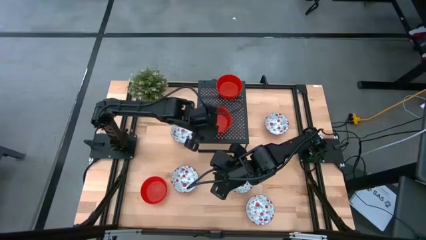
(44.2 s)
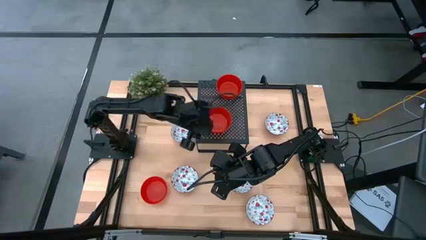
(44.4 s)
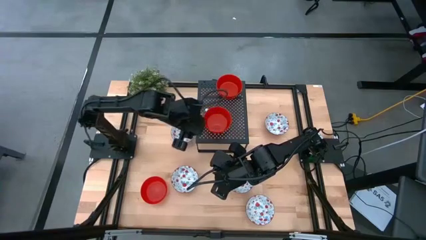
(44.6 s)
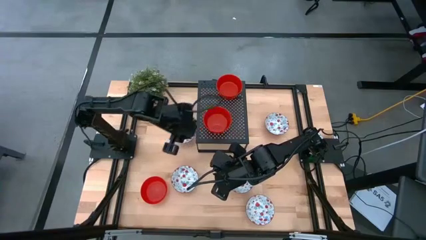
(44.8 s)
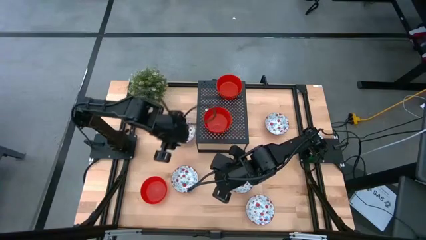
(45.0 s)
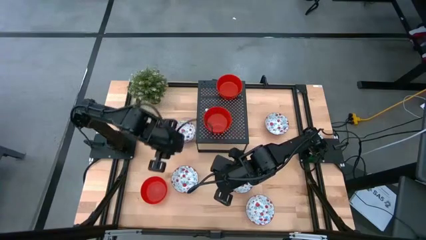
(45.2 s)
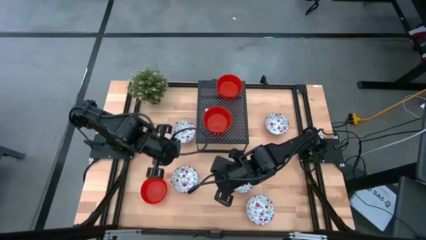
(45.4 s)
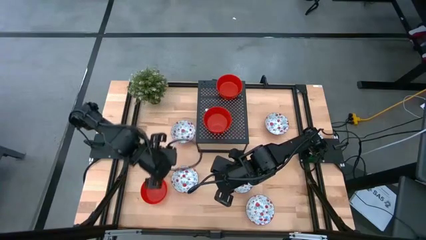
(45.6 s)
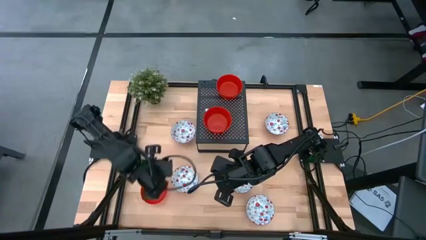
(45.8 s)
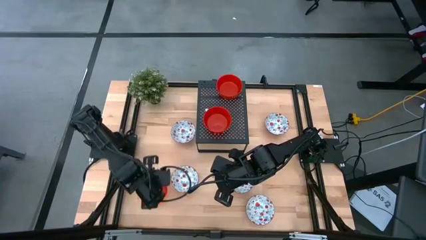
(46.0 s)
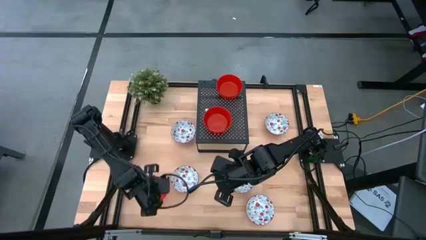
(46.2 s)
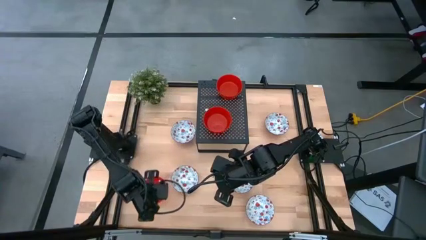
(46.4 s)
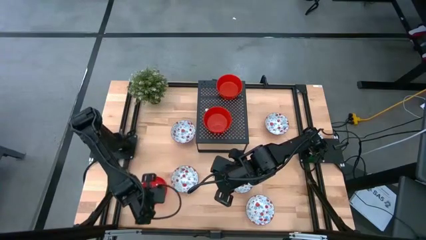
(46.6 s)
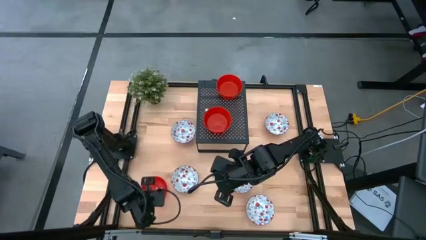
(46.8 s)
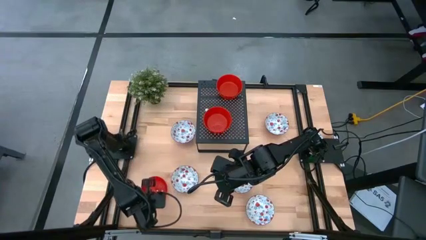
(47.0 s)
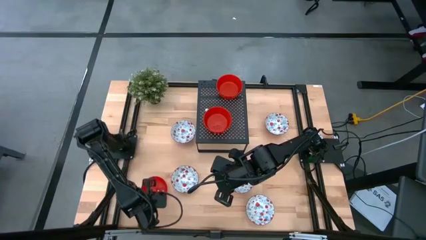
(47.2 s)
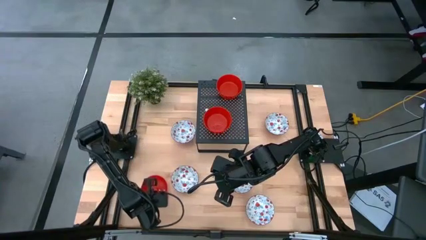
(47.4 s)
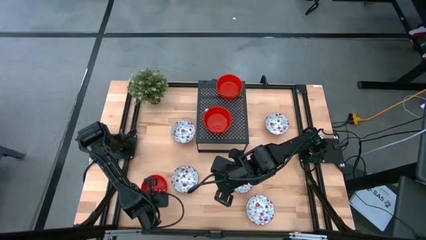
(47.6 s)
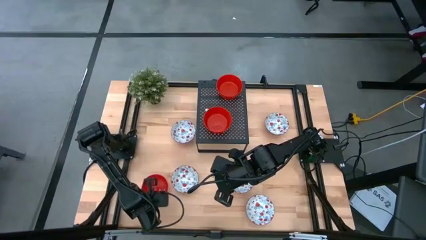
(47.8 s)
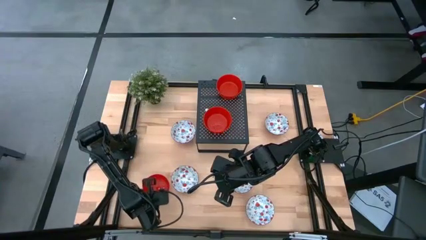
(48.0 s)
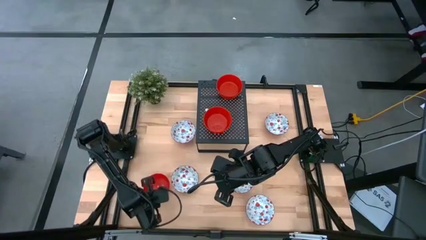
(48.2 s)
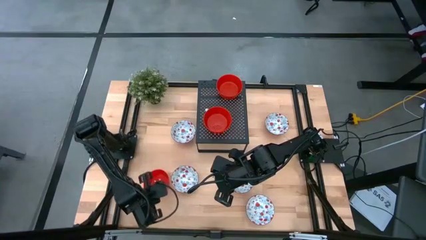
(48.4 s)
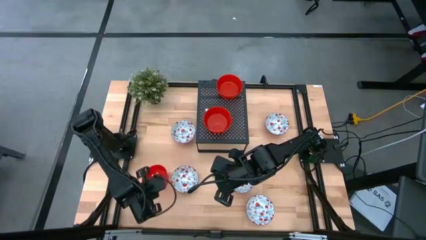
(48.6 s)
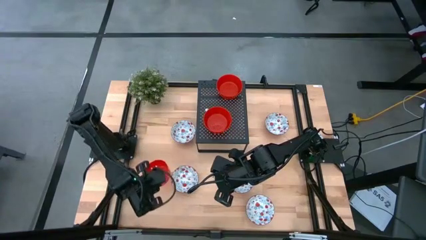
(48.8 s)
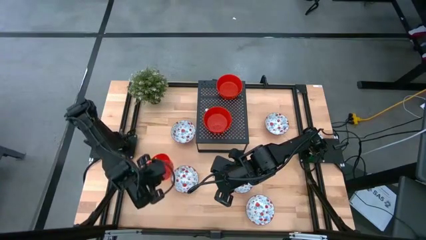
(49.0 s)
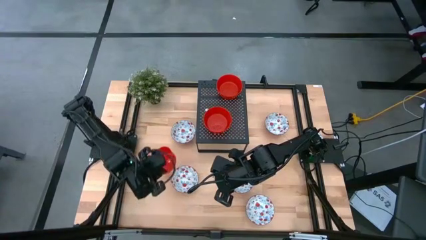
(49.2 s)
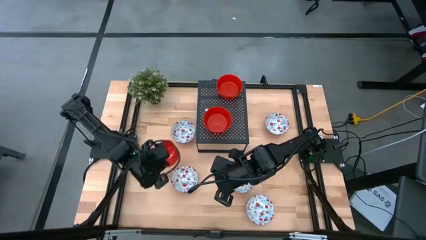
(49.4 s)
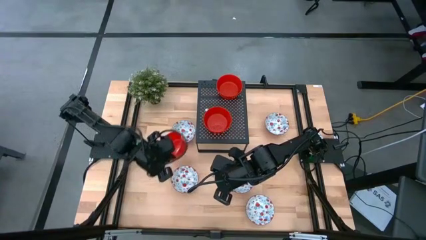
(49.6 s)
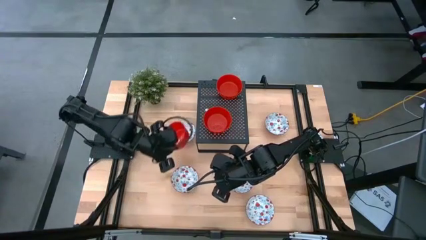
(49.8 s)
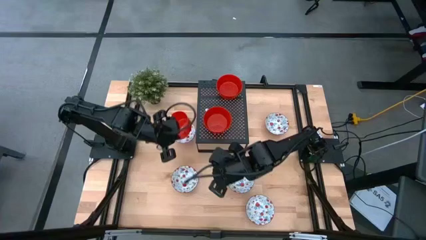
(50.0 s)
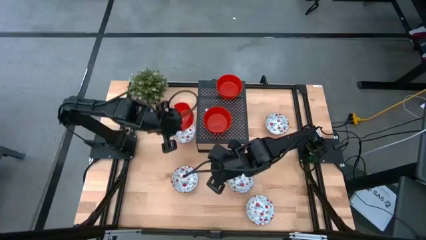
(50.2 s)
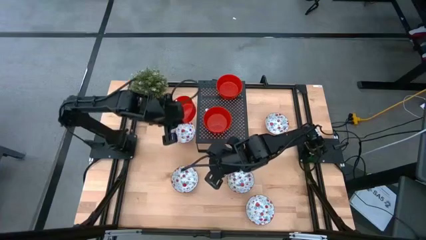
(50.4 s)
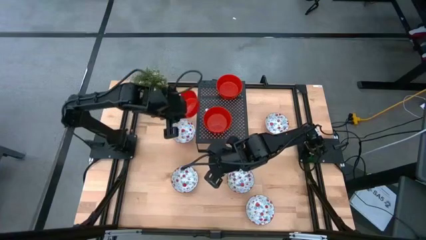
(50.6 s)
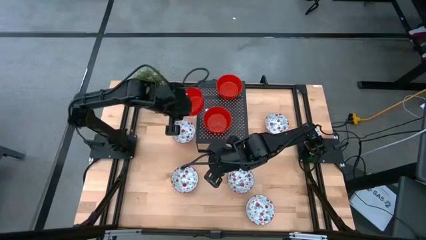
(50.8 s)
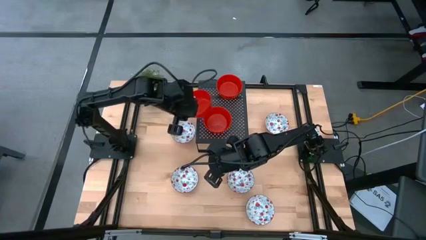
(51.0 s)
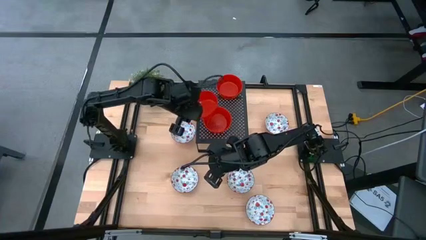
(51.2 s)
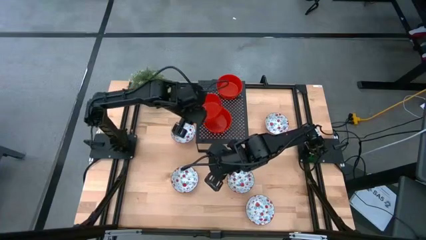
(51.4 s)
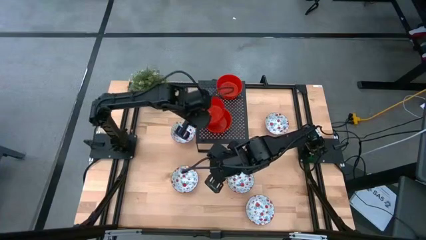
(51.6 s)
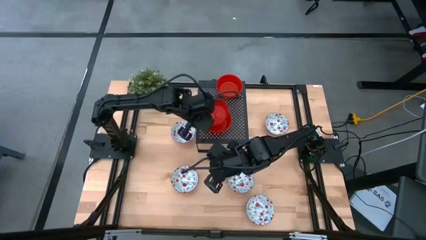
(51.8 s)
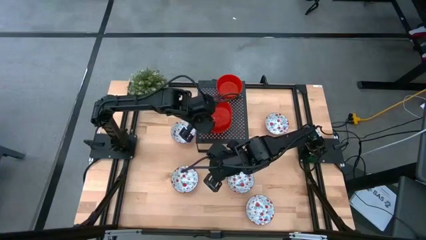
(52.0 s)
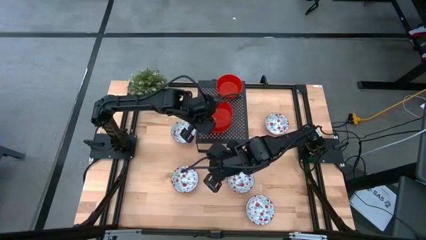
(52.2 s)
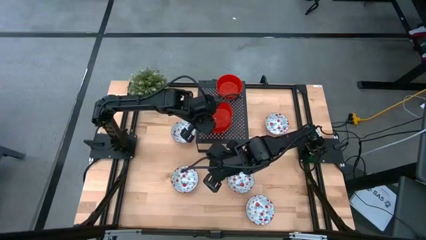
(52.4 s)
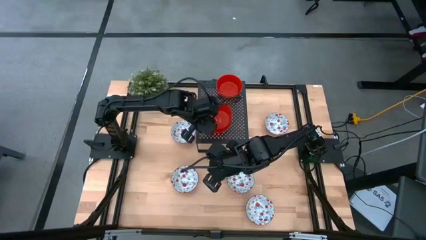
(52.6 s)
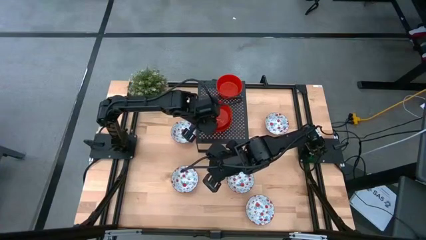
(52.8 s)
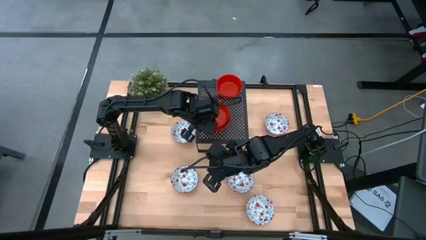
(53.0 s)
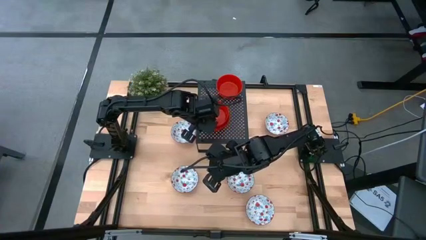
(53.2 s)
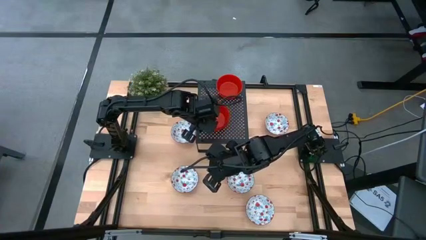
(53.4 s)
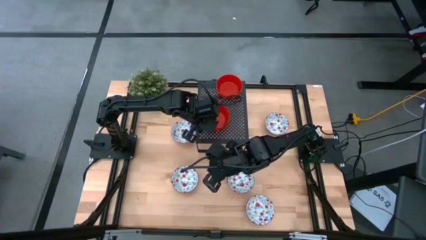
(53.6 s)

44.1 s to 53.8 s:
Task: Pick & Place Mini bowls
Stack the red bowl on top of the bottom red bowls on the shelf

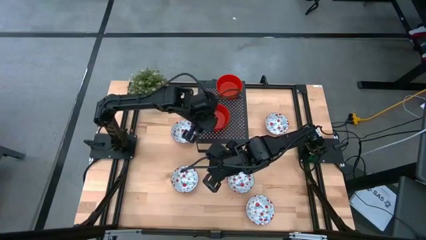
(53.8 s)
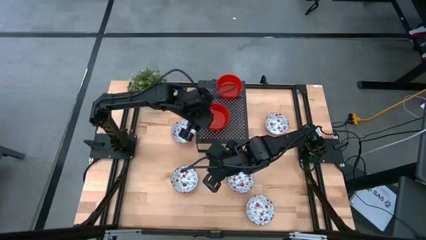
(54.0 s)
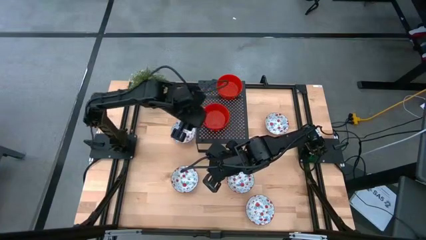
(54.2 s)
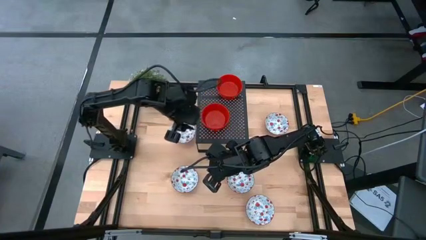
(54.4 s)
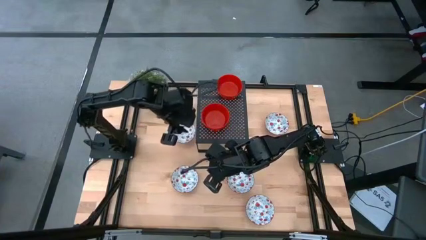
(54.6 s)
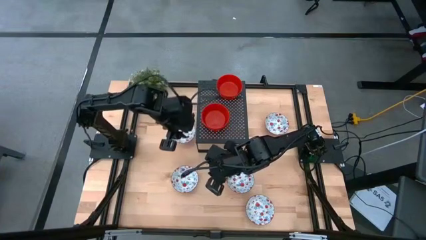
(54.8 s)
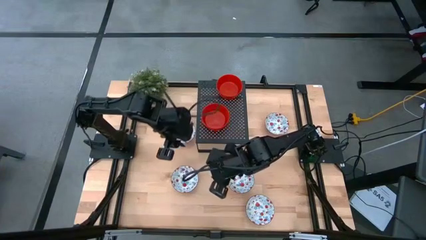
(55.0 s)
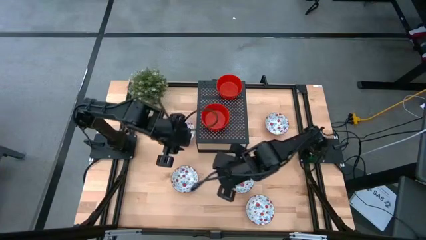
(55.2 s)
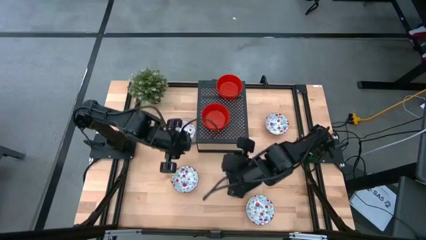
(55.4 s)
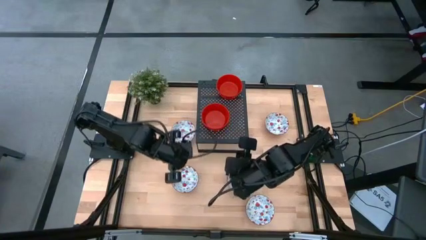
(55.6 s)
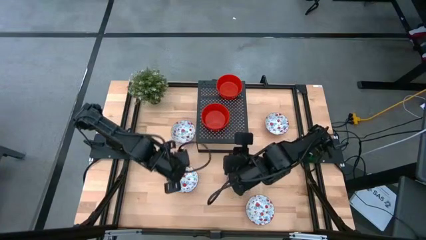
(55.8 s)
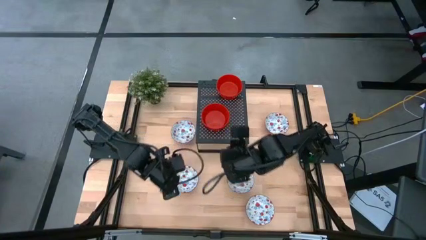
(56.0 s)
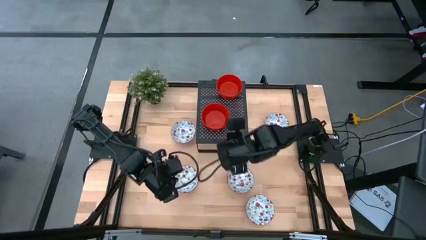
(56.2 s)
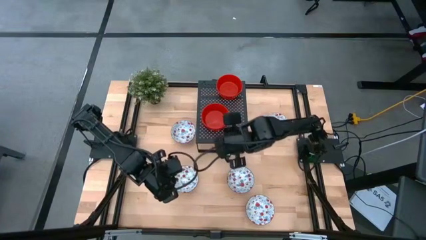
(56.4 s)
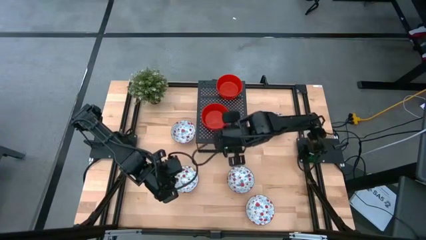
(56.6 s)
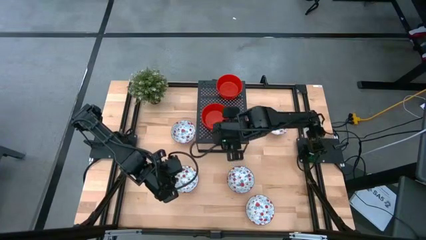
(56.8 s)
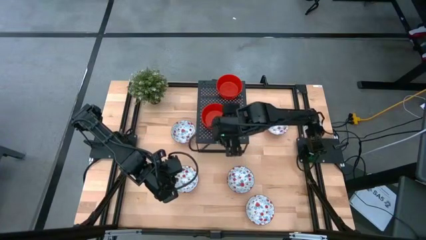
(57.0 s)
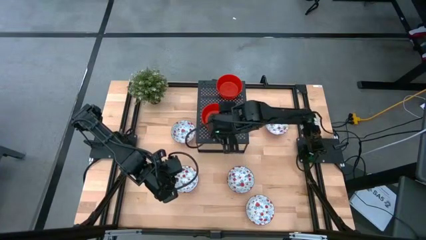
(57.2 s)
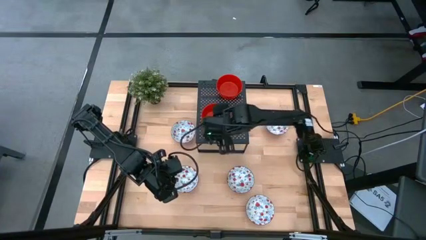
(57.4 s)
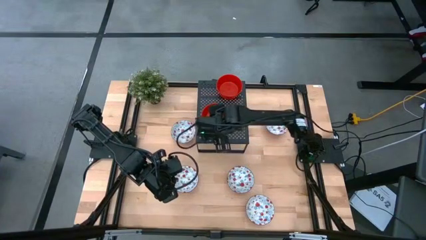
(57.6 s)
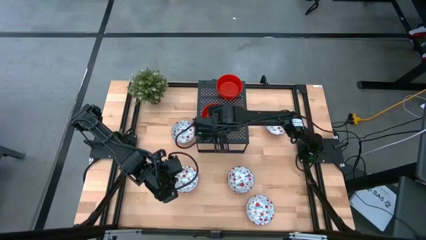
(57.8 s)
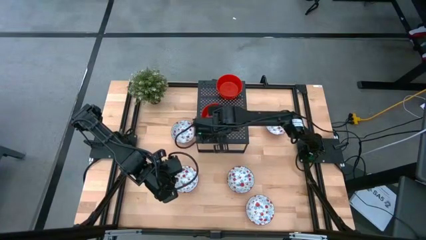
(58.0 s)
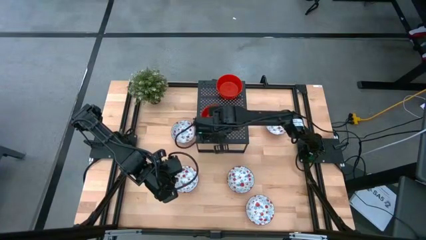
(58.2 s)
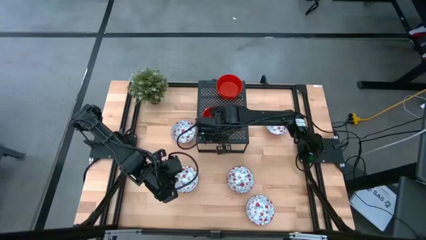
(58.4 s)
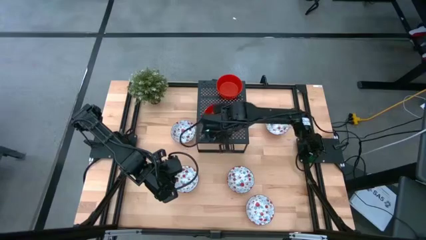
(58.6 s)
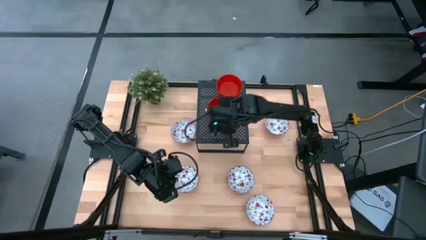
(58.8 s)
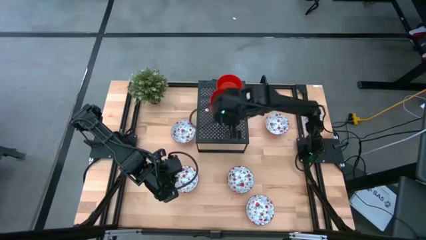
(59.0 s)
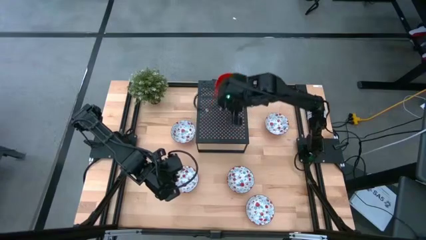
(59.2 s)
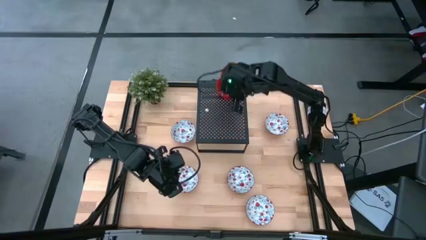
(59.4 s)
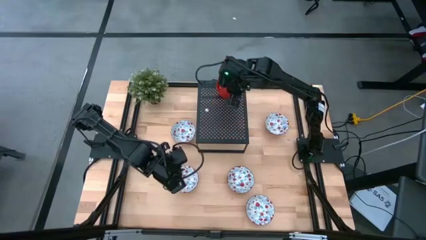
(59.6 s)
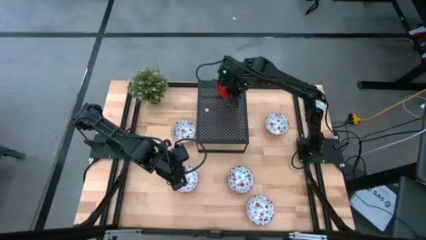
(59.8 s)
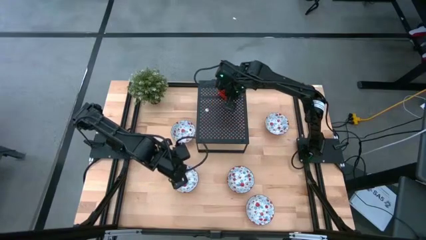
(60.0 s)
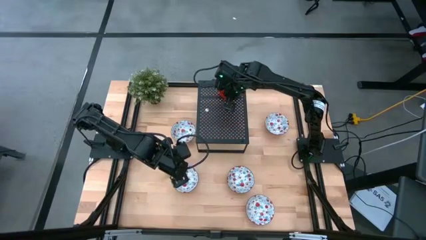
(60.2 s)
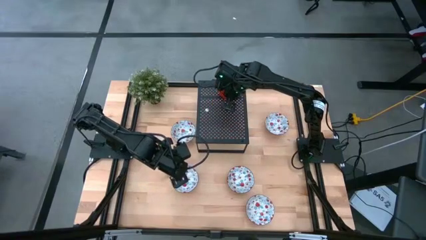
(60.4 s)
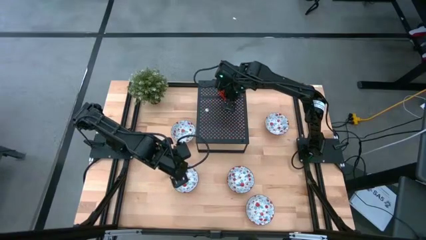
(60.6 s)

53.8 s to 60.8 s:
Stack the bottom red bowls on top of the other stacked red bowls on the shelf
